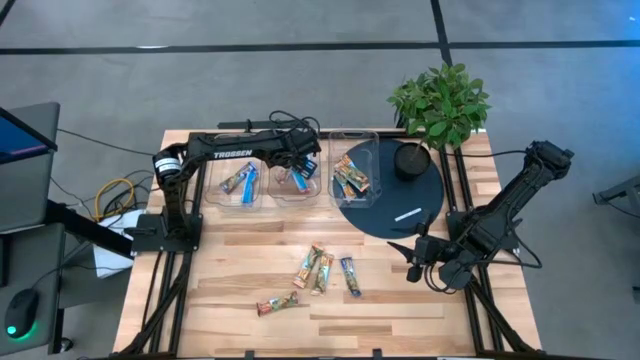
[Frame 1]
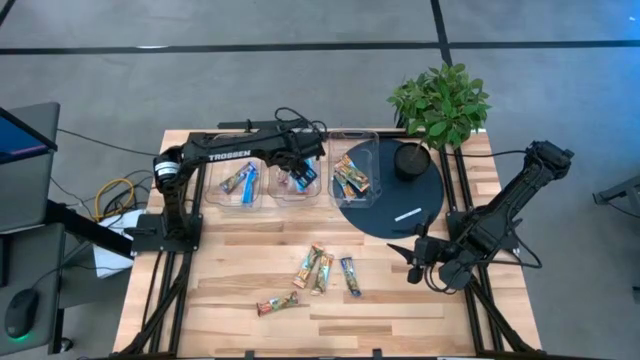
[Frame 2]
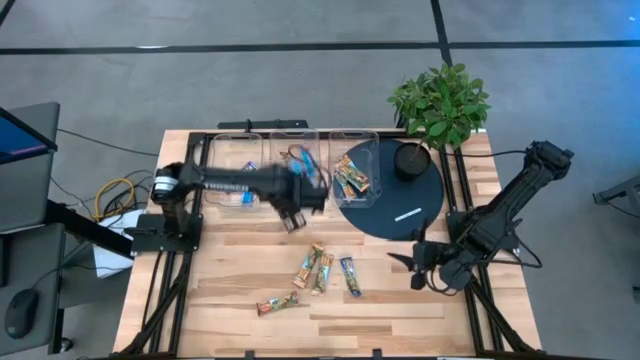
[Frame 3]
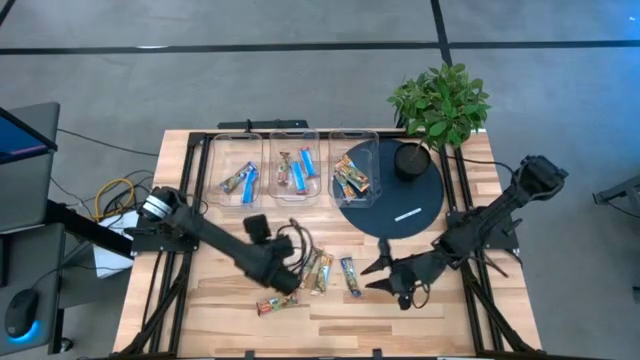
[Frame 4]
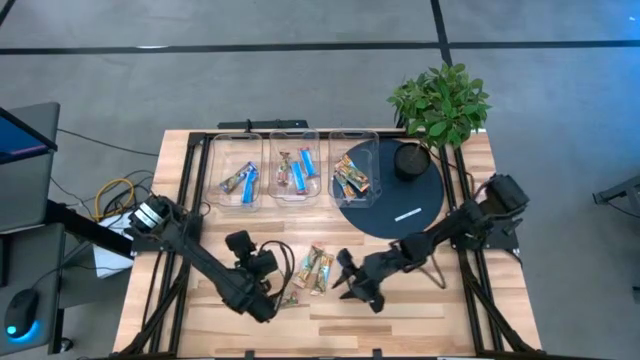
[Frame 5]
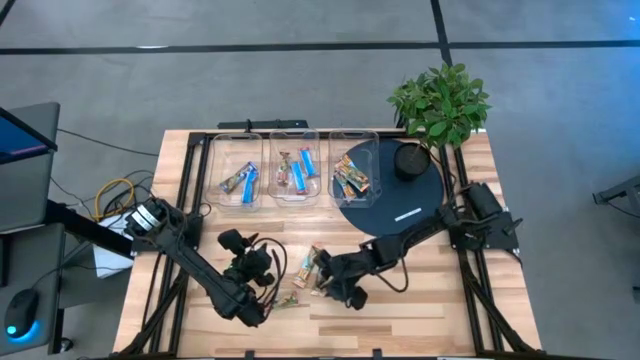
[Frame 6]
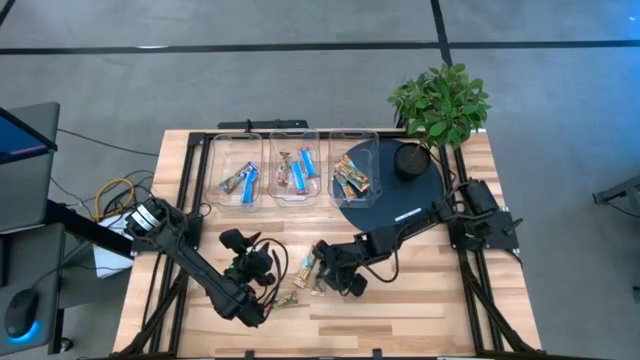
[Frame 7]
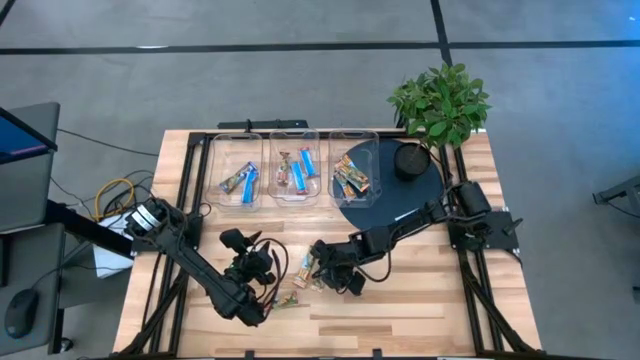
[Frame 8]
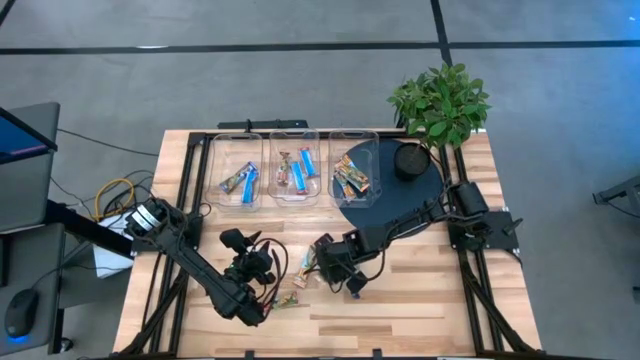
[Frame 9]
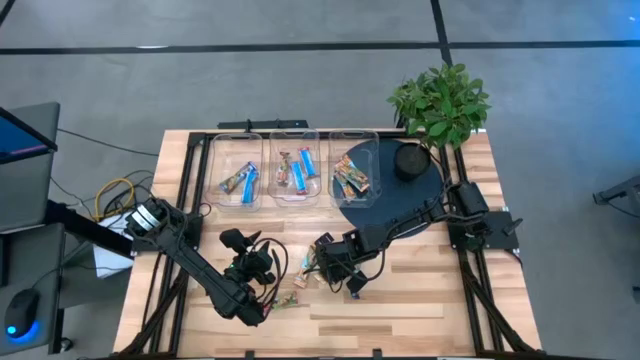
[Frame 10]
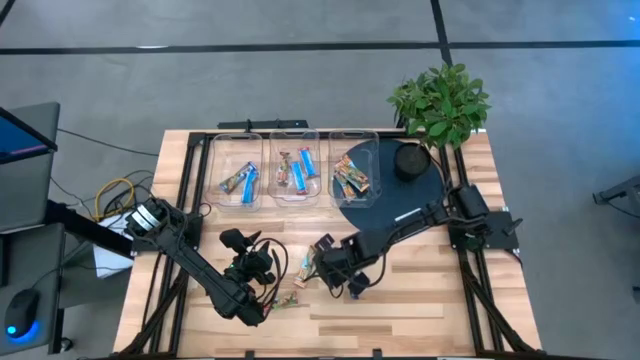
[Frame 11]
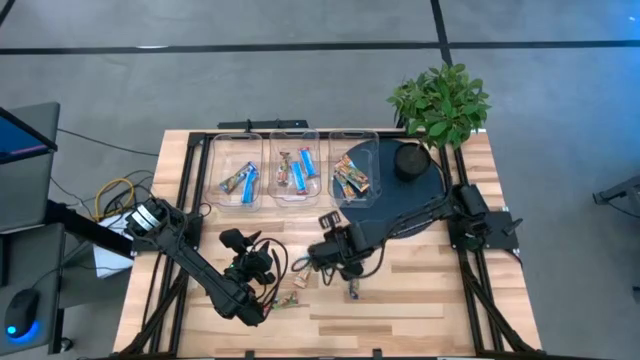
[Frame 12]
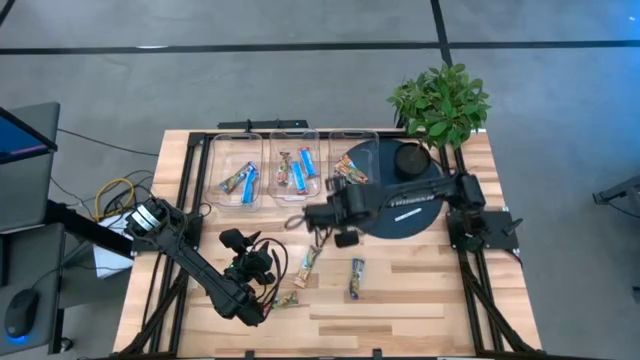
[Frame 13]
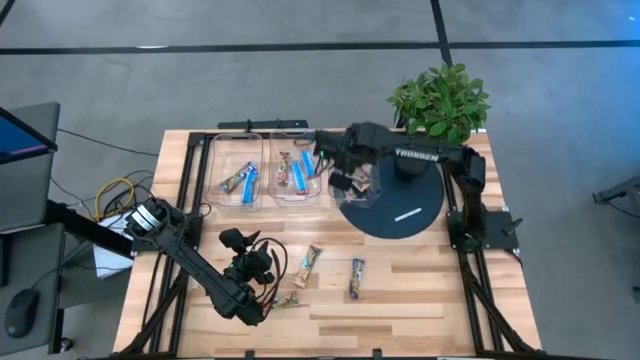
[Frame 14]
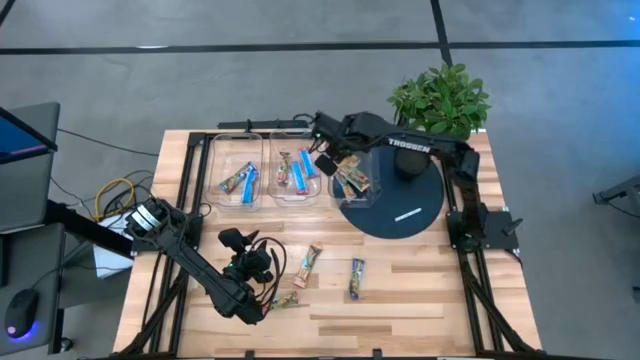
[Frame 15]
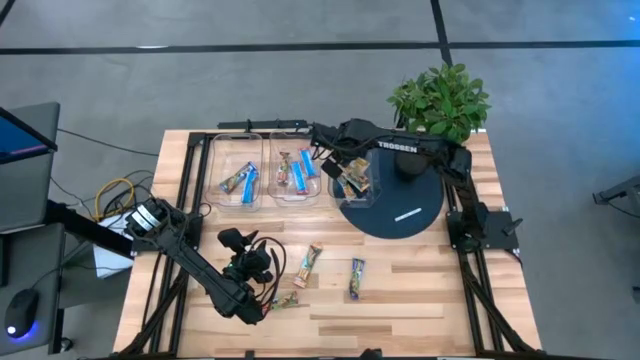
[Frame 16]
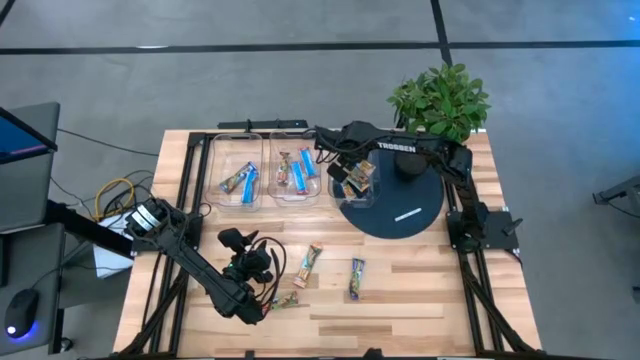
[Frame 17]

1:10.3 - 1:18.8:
Task: Pick and place Granola Bars by type
Put the orange chocolate chip into the right transparent bin

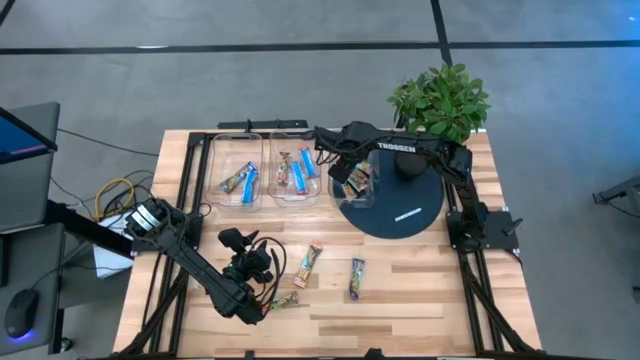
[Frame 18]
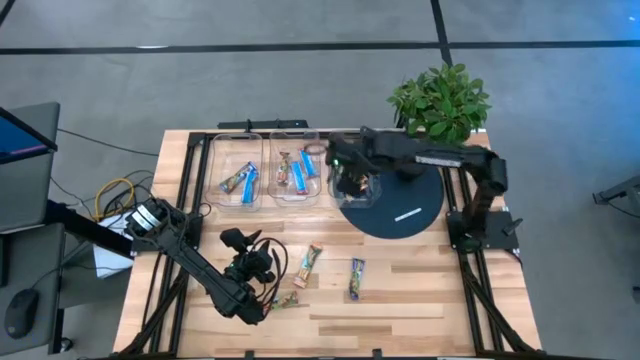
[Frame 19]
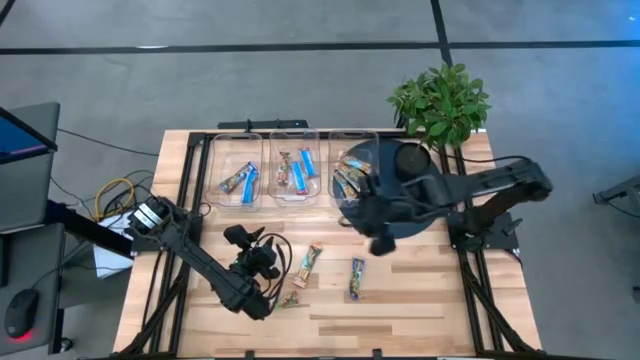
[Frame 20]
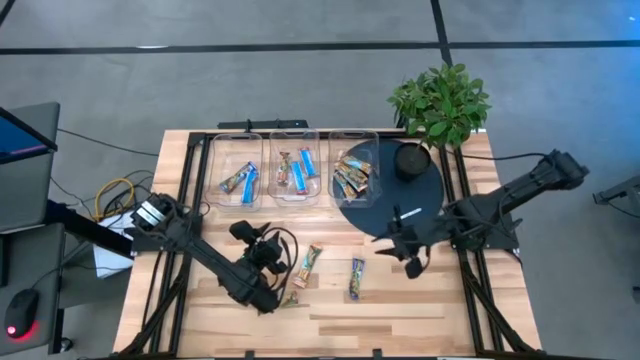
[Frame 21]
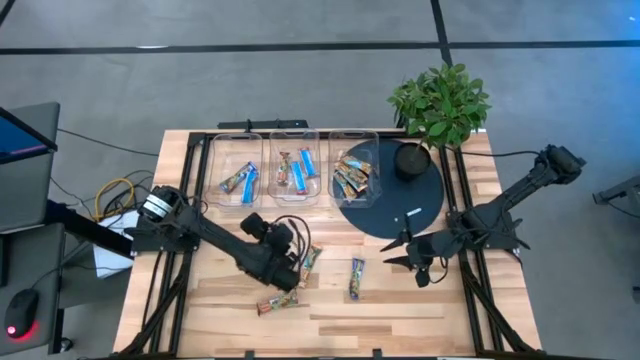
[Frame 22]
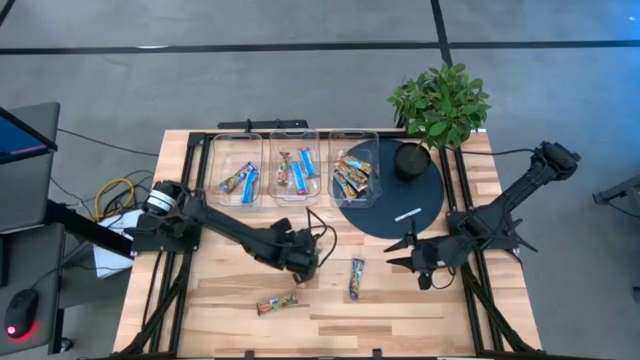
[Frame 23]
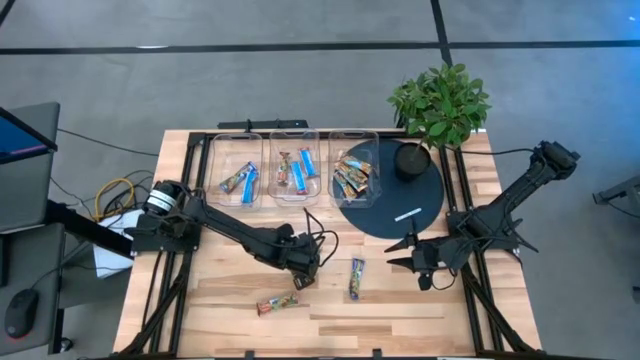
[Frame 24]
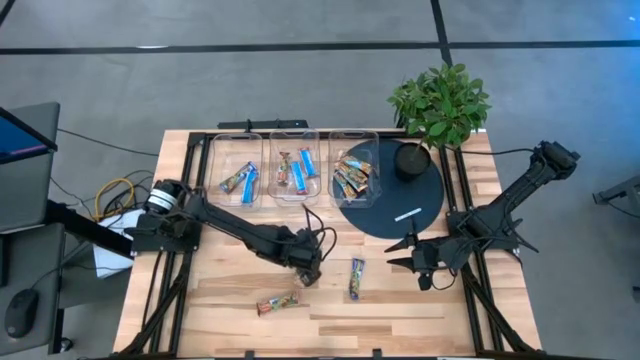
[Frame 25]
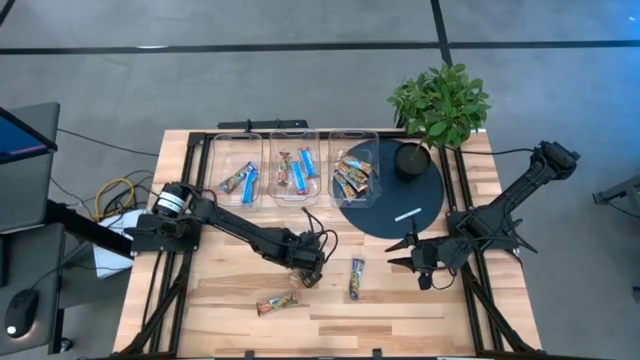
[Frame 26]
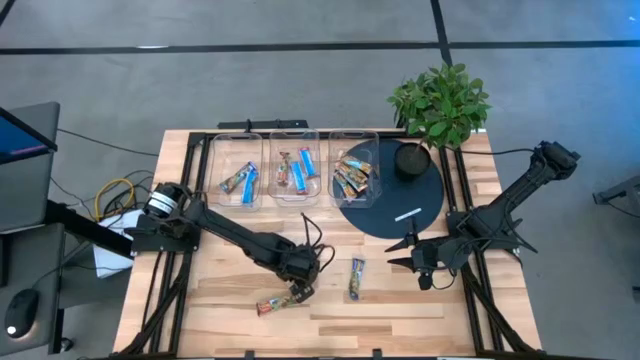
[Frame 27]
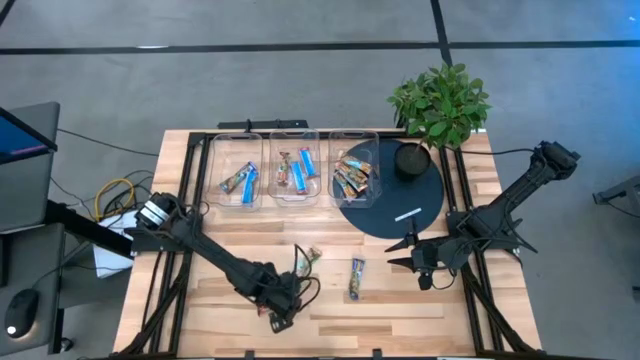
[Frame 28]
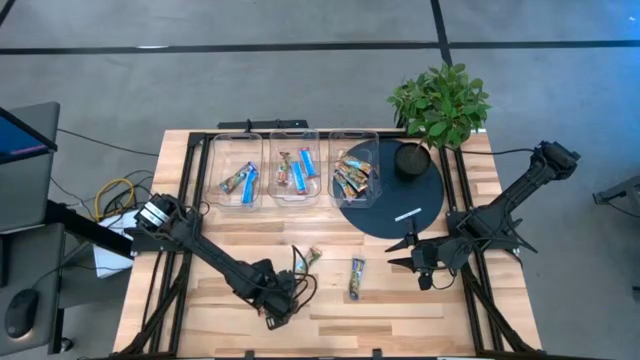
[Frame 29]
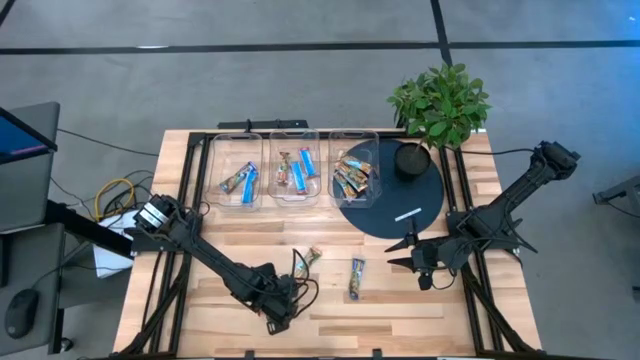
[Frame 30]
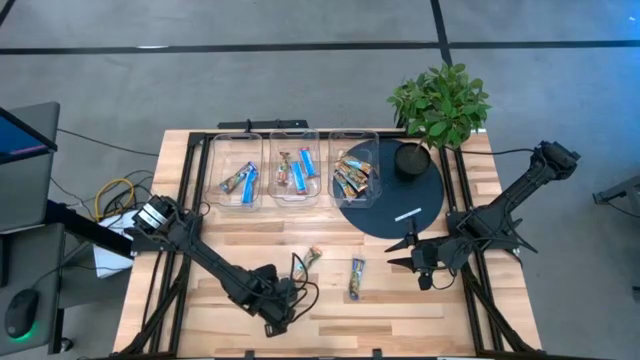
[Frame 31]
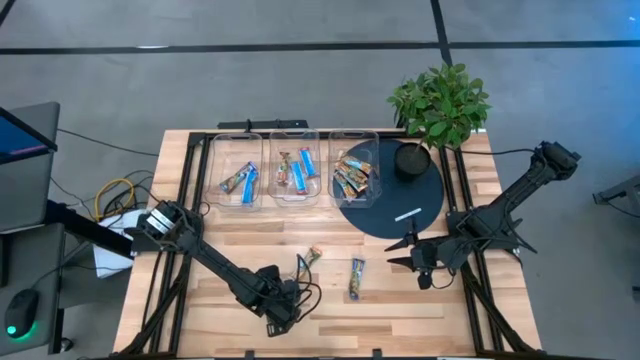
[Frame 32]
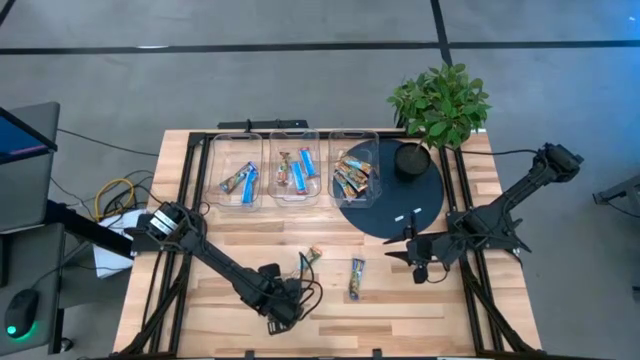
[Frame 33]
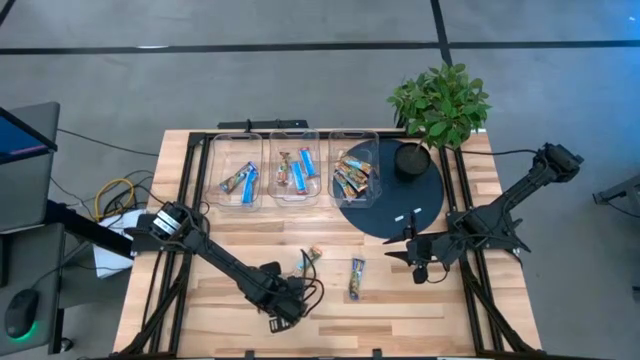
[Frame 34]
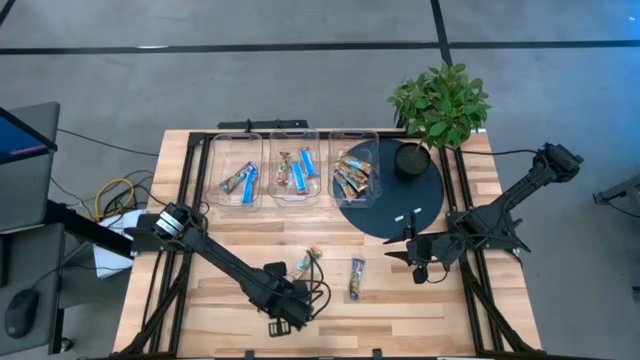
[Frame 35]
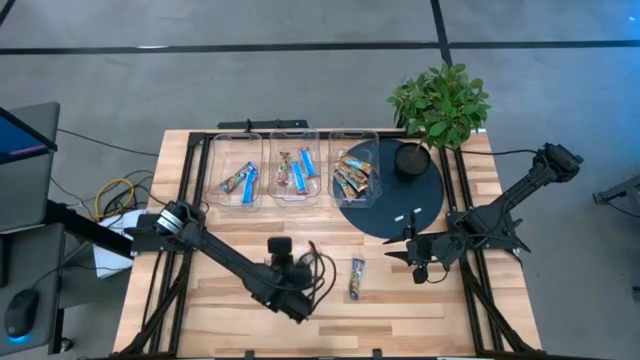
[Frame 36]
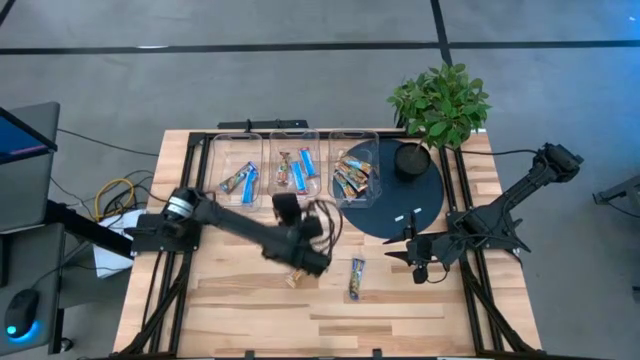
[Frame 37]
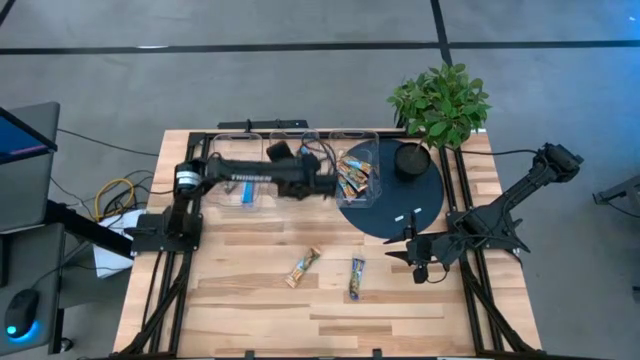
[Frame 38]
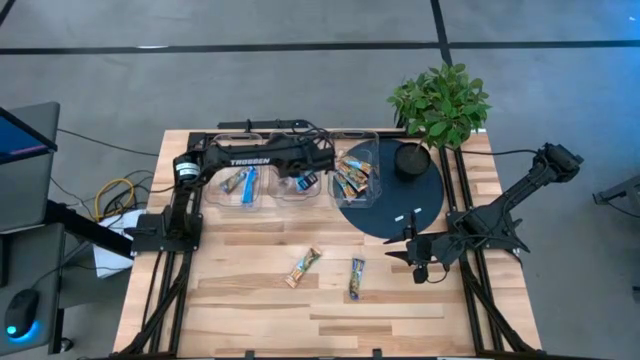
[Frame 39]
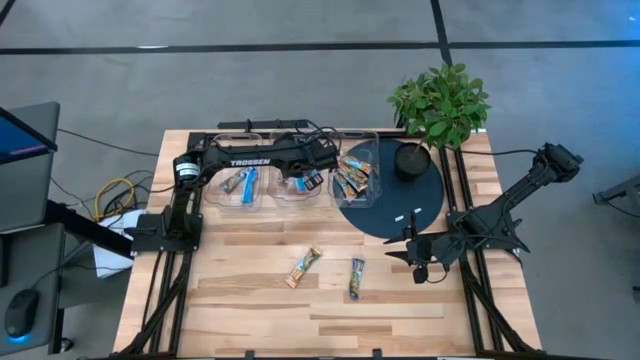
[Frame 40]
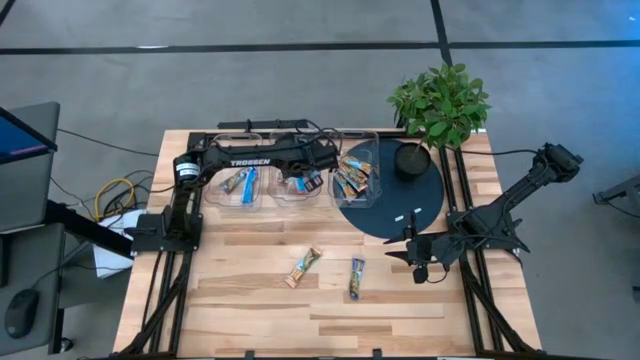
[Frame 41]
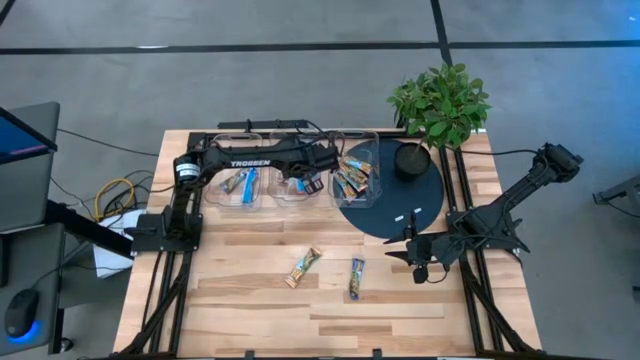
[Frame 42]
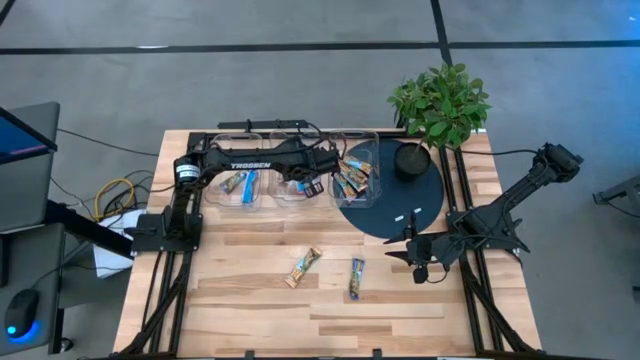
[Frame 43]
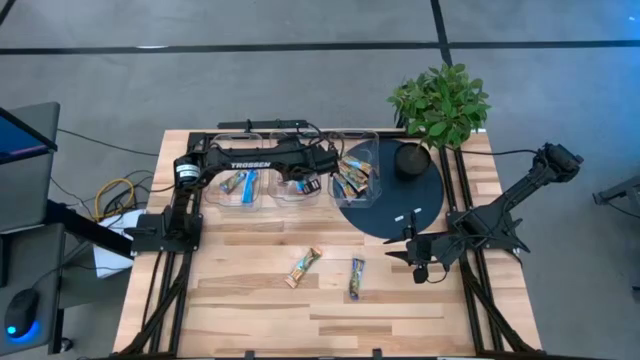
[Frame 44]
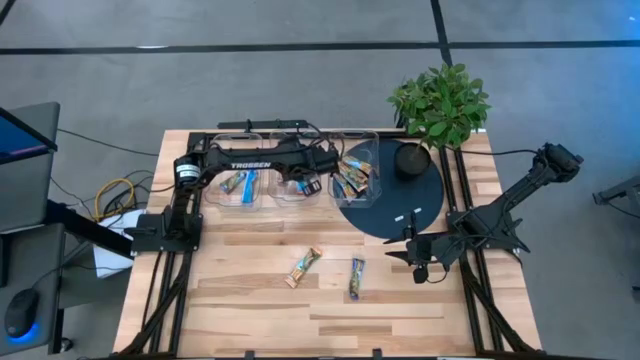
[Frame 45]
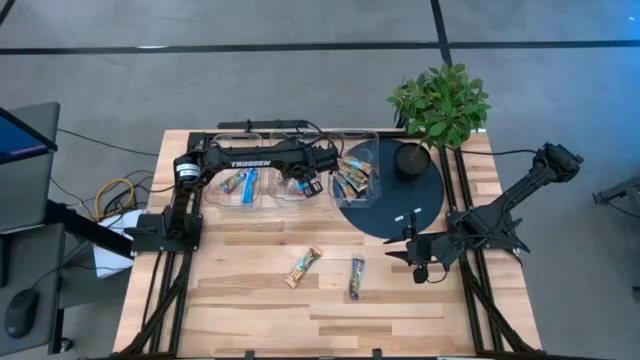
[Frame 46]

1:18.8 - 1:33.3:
Put the red chocolate chip into the center transparent bin
